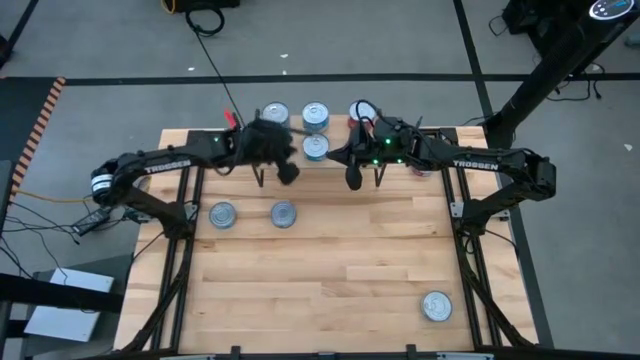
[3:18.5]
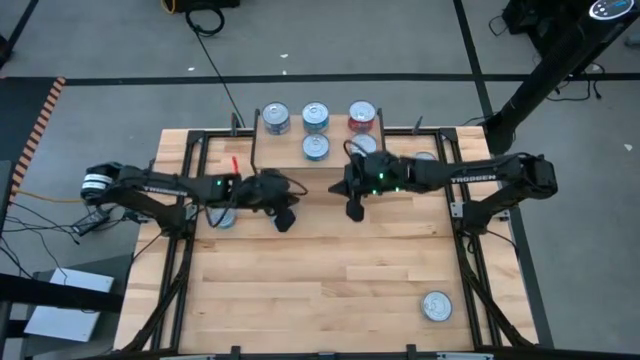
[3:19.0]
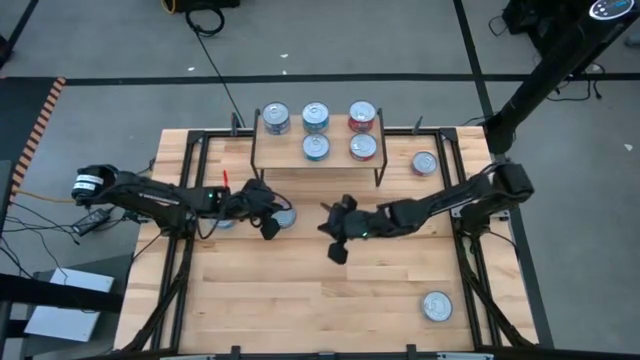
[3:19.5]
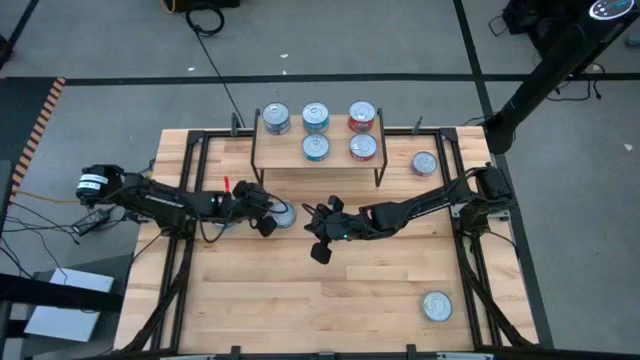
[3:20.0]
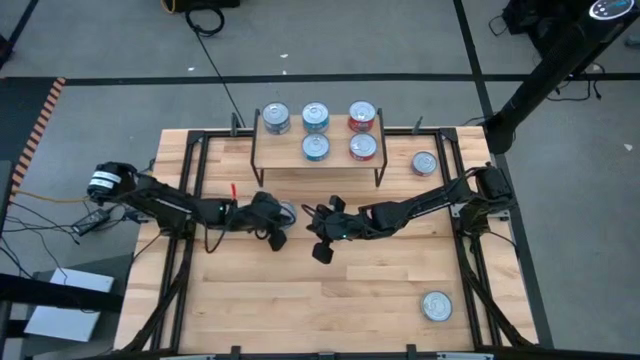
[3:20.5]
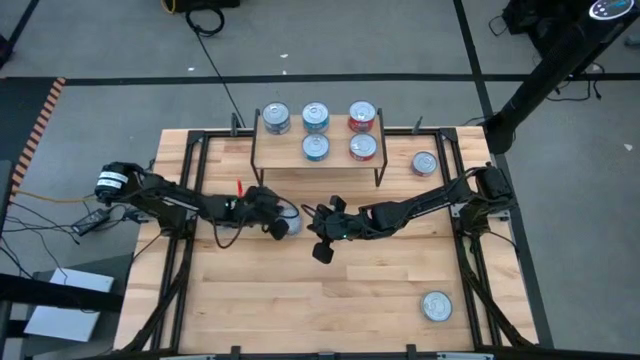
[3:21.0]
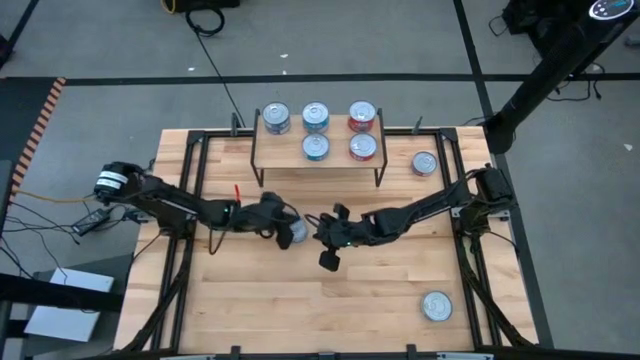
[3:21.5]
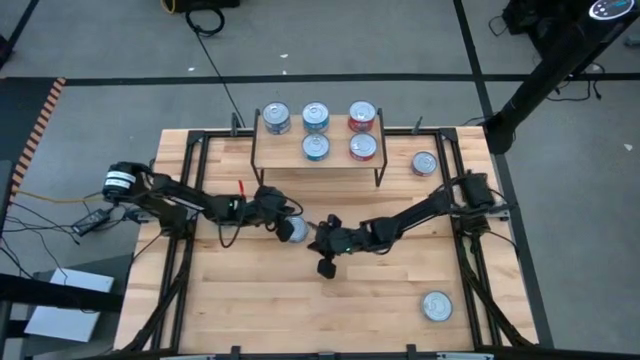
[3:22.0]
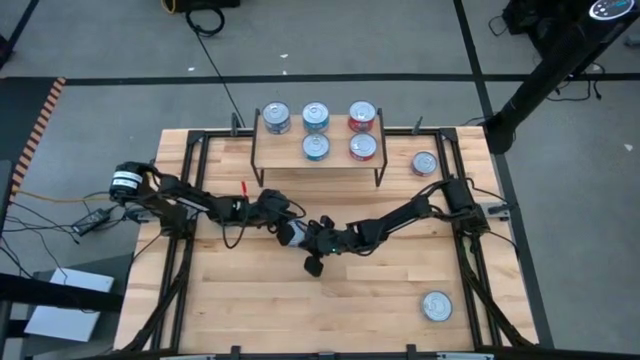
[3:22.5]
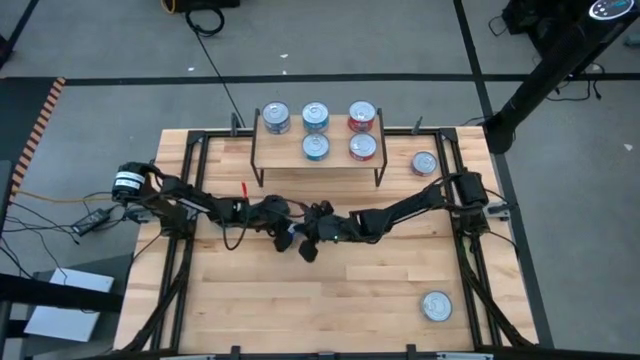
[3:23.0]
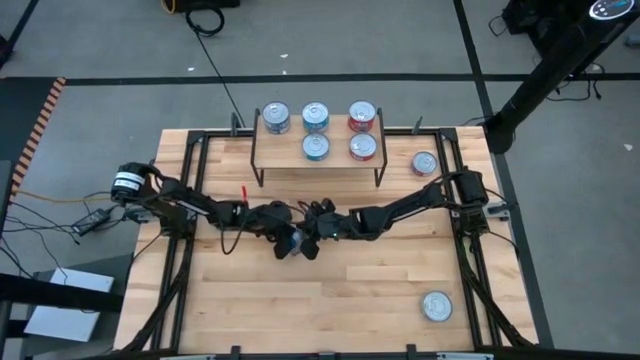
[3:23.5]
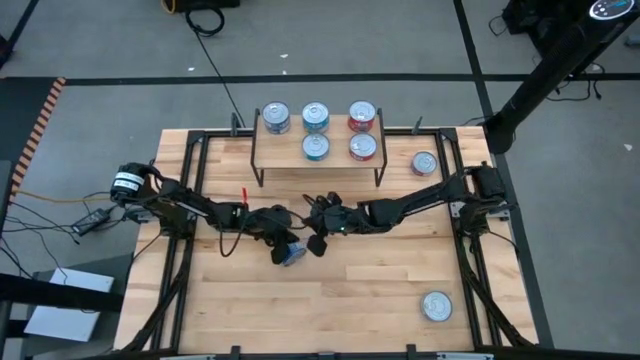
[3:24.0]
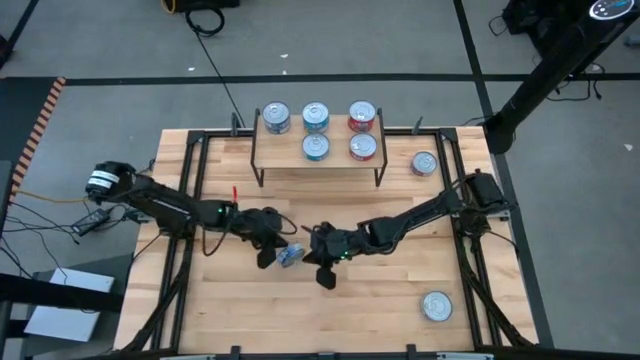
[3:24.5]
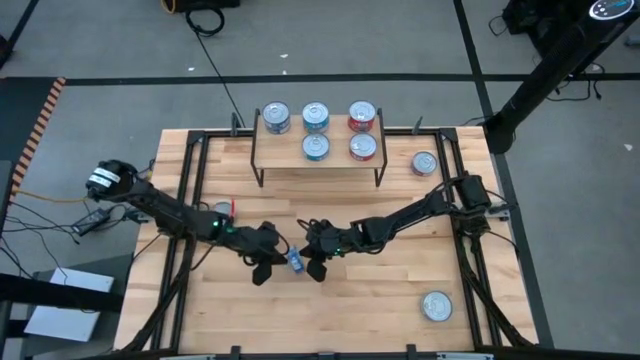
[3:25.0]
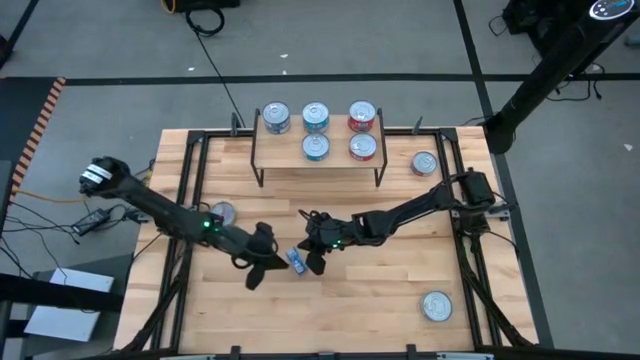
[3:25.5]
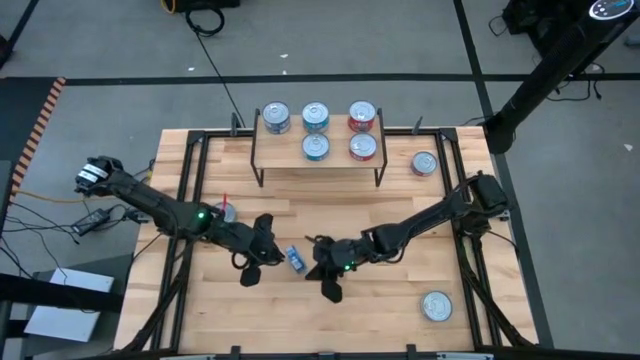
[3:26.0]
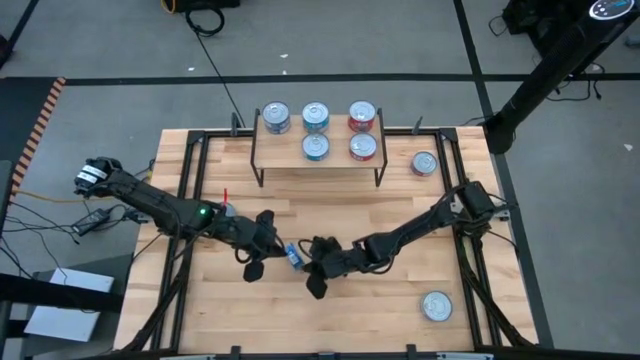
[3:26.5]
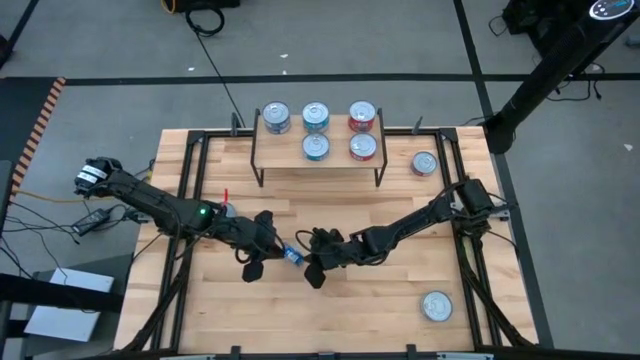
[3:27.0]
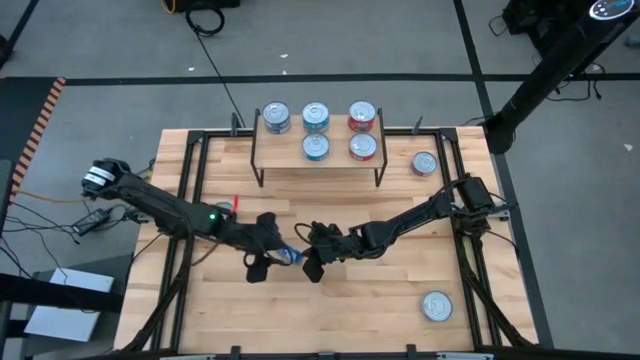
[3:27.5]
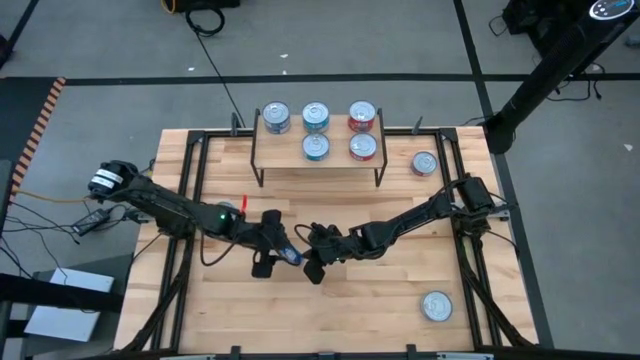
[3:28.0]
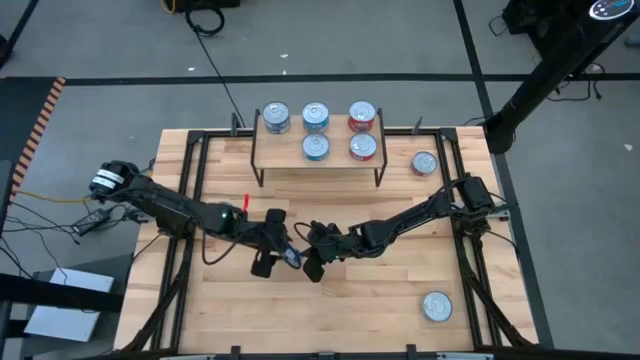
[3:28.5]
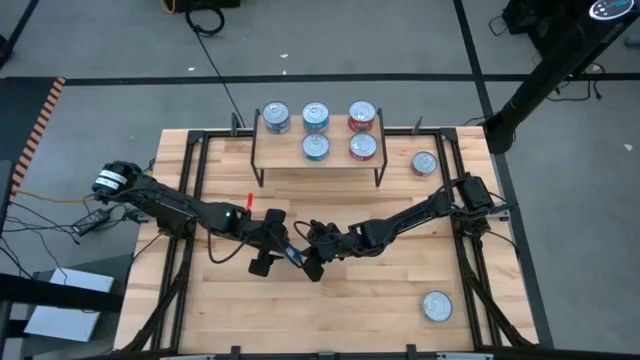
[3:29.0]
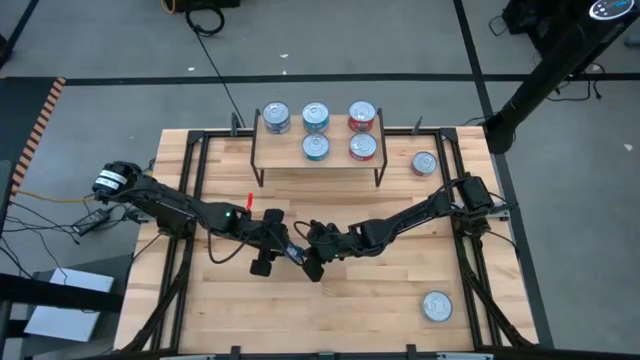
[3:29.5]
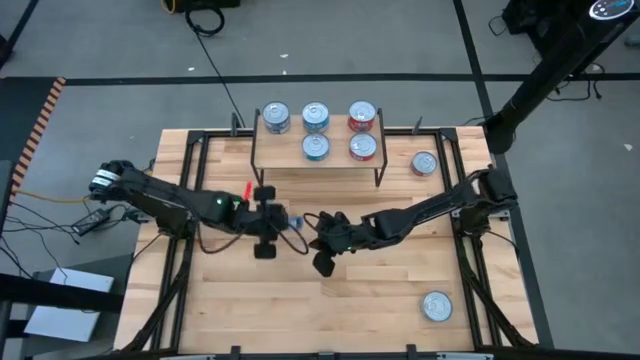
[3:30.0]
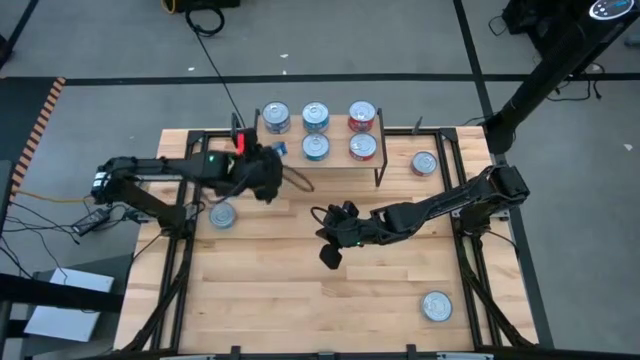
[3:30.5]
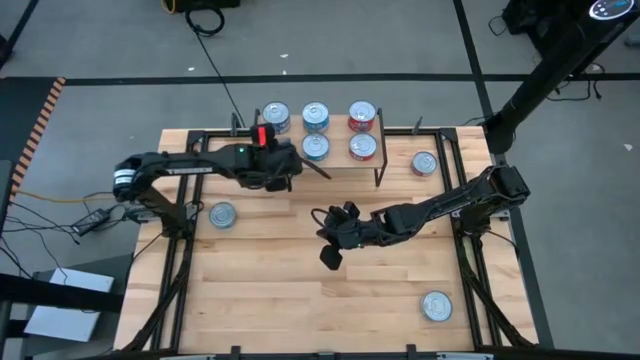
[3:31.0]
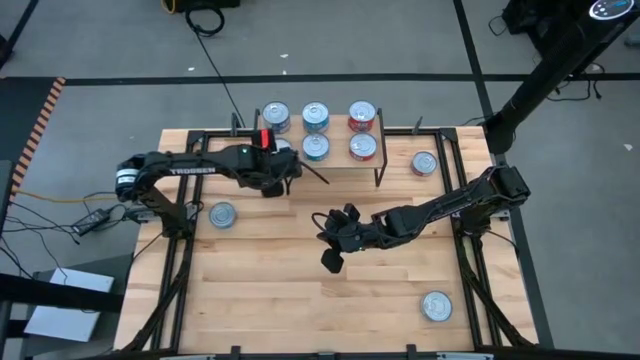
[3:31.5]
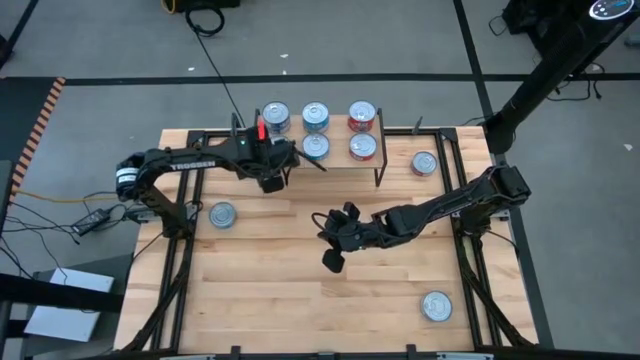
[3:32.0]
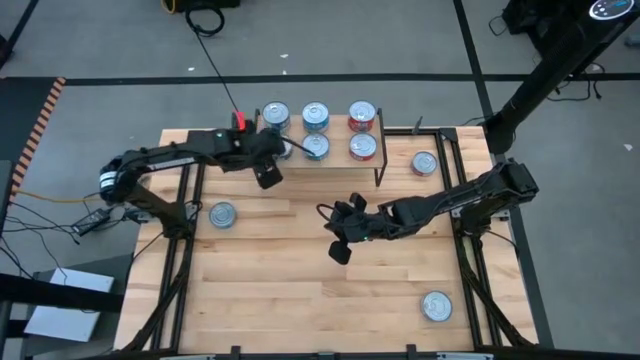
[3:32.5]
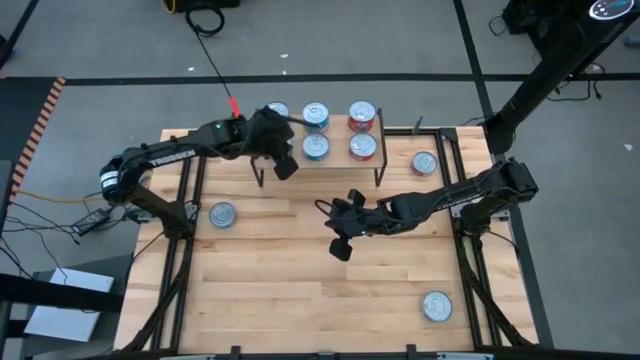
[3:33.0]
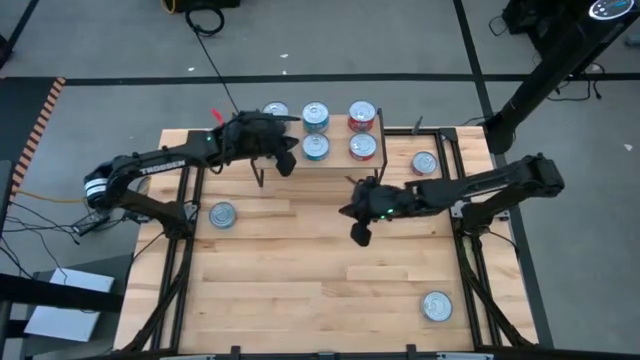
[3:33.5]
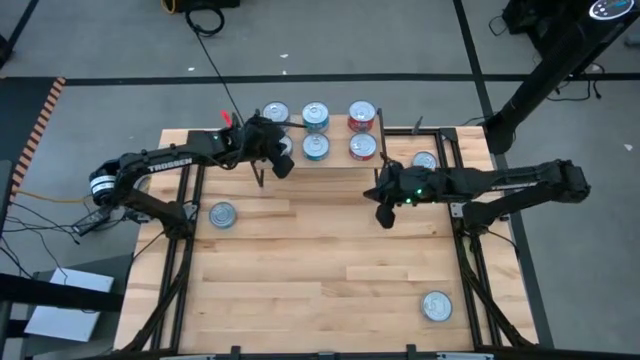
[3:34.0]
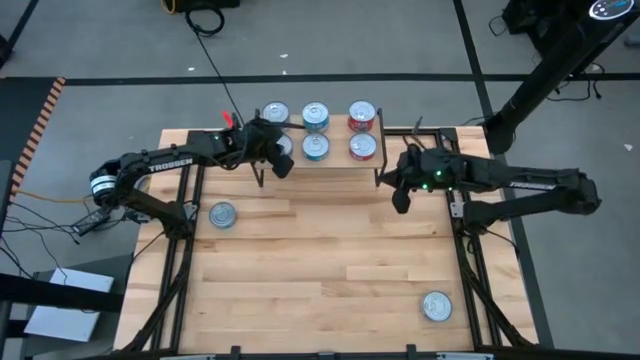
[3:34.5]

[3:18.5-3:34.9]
Task: Stack canned seafood by type on shelf
Put the blue tuna can on the shelf

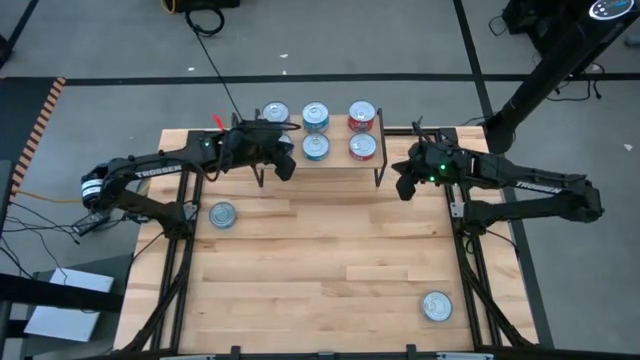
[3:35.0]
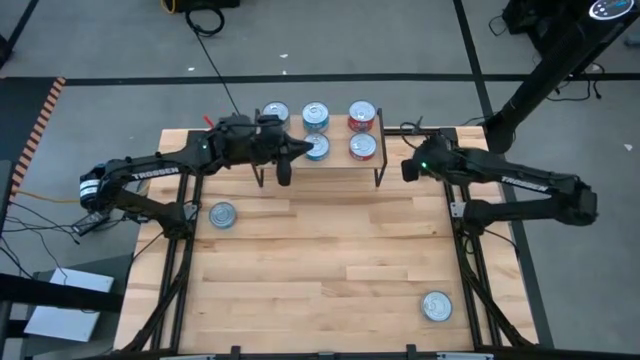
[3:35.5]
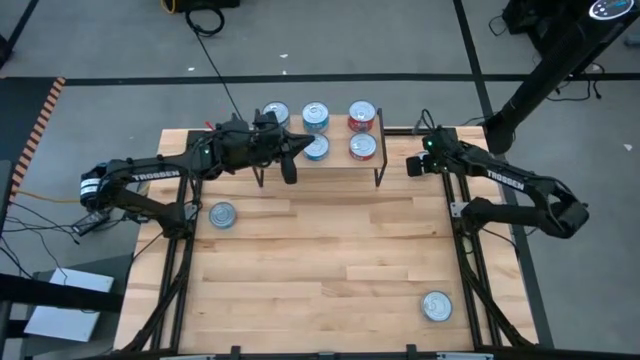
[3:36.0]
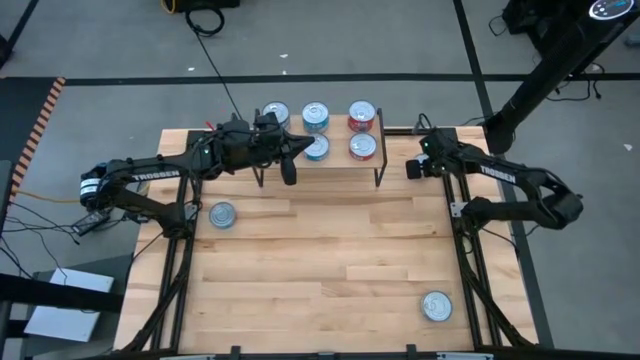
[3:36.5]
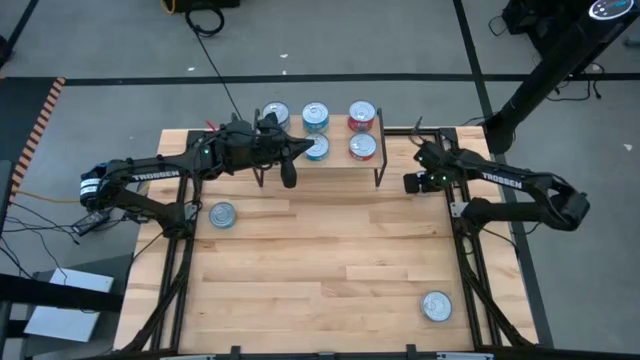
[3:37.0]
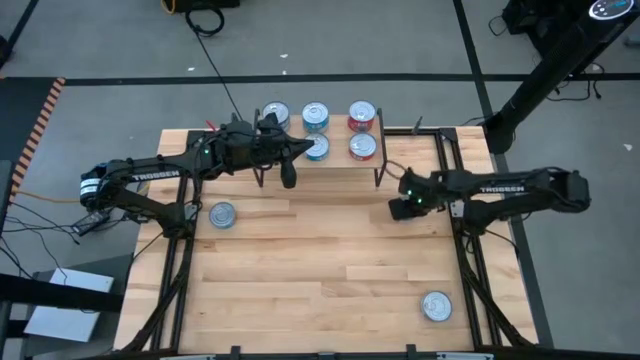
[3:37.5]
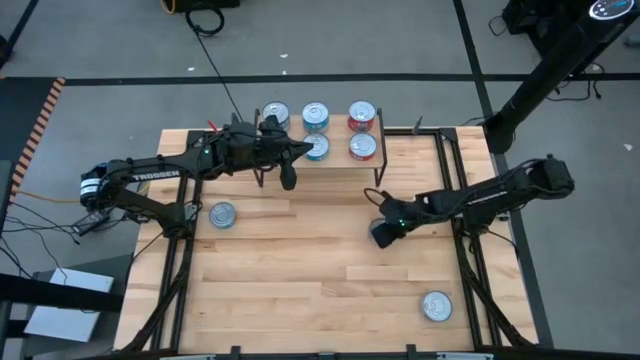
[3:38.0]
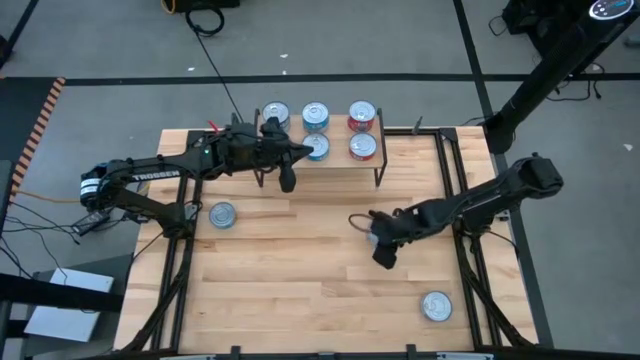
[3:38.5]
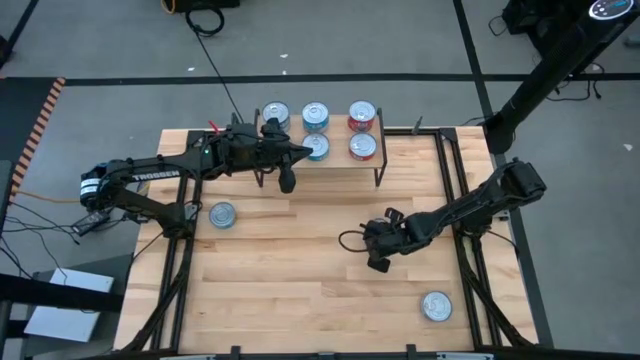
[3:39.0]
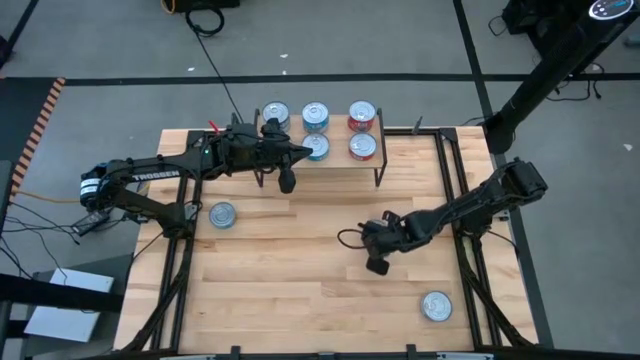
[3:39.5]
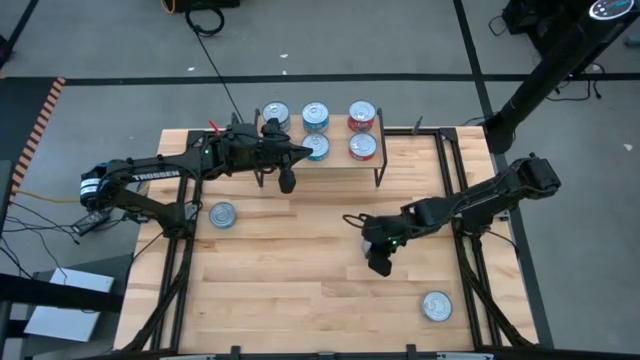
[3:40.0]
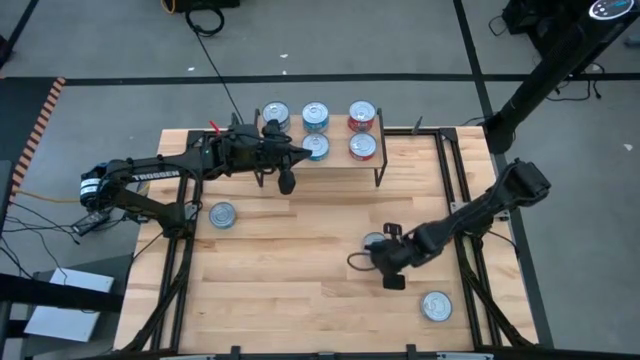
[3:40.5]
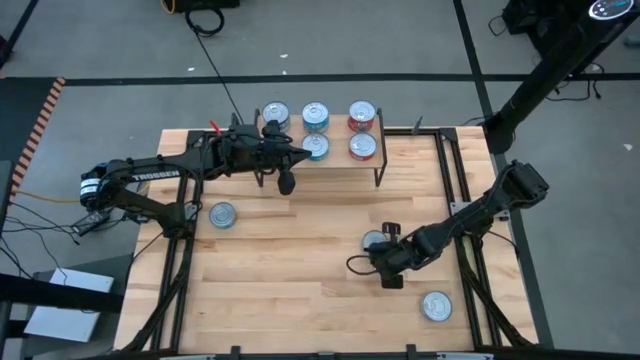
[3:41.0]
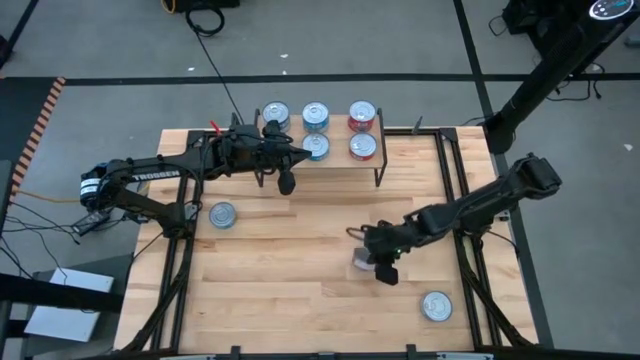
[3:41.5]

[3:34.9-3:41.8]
Stack the red tuna can on top of the other red tuna can on the shelf
